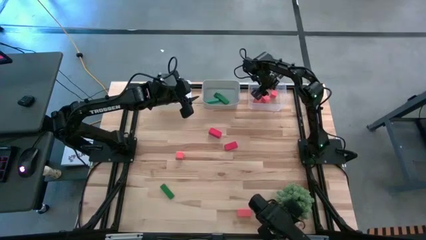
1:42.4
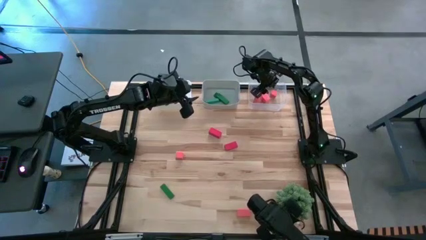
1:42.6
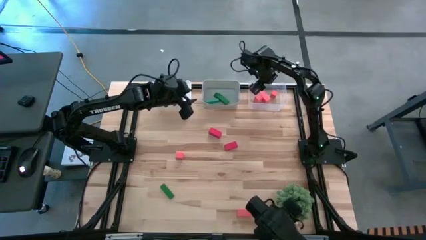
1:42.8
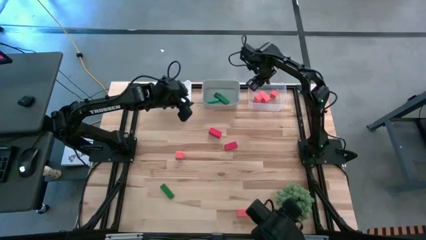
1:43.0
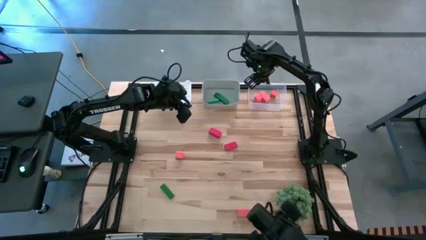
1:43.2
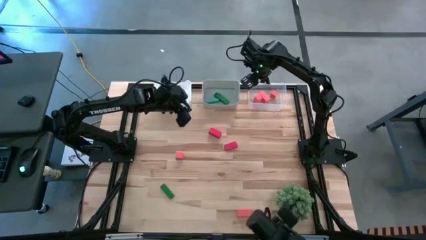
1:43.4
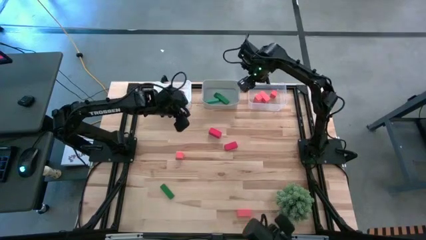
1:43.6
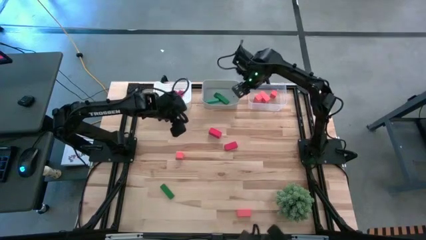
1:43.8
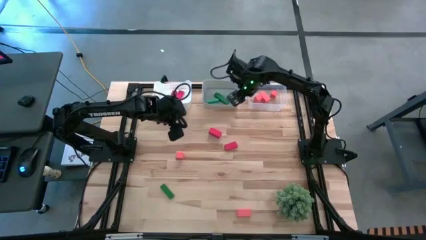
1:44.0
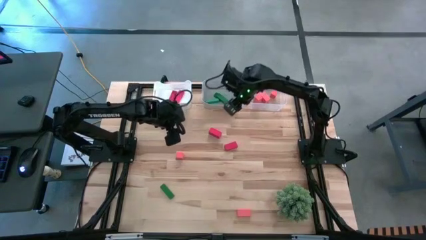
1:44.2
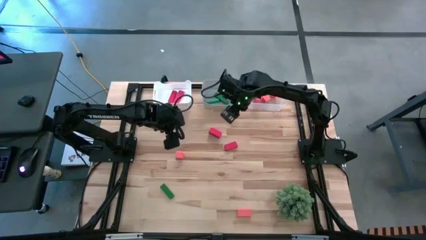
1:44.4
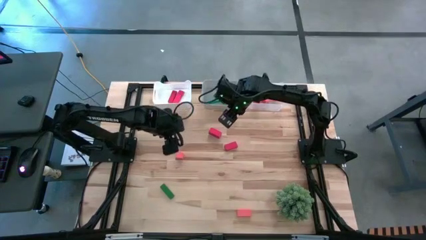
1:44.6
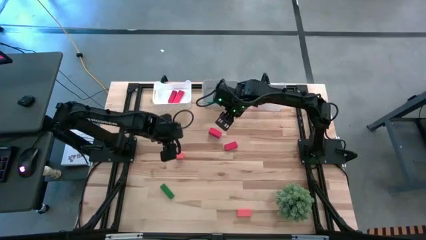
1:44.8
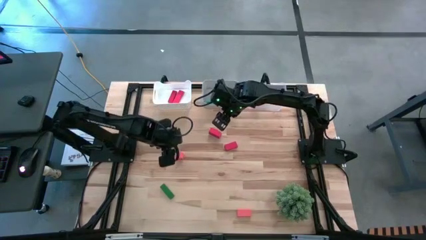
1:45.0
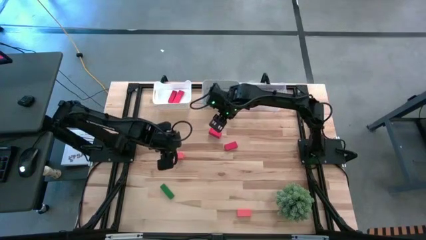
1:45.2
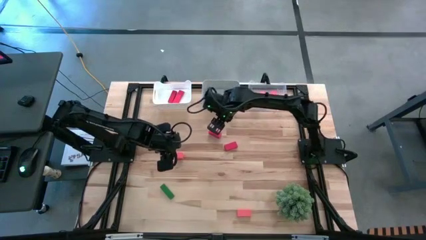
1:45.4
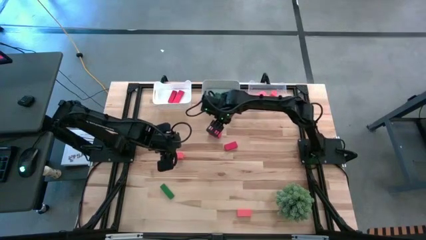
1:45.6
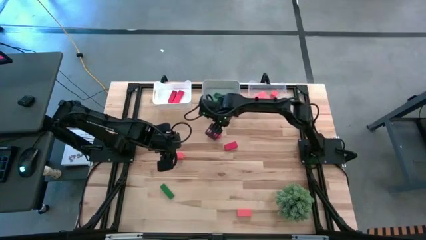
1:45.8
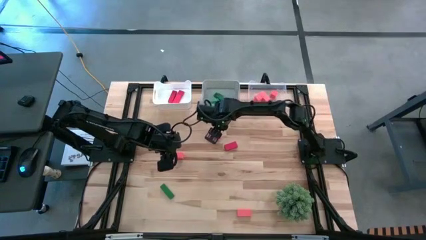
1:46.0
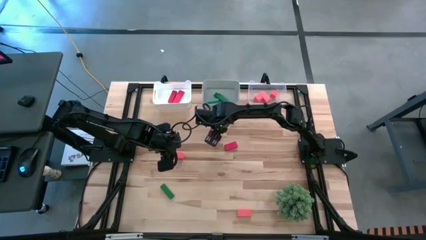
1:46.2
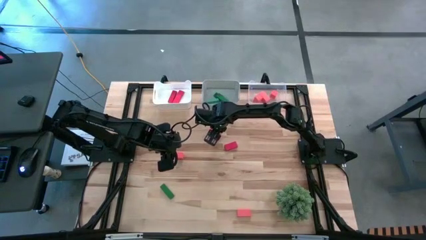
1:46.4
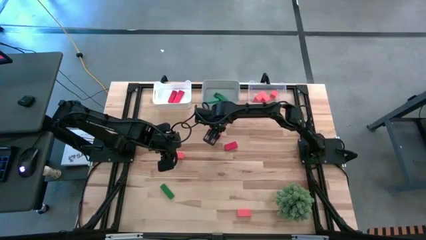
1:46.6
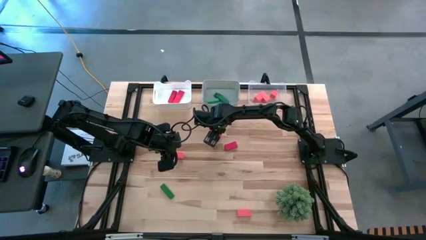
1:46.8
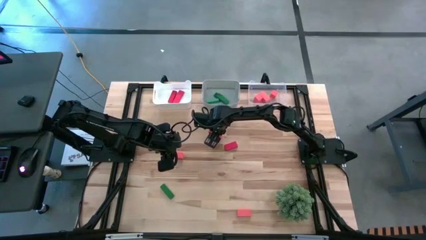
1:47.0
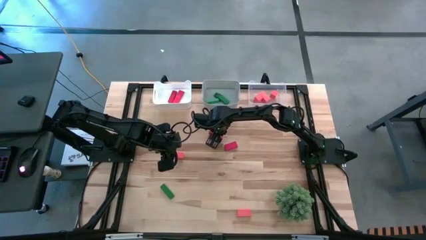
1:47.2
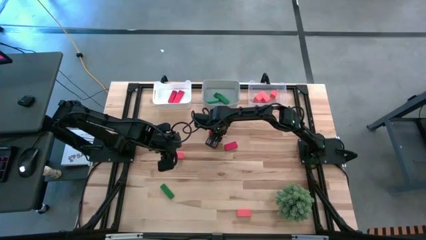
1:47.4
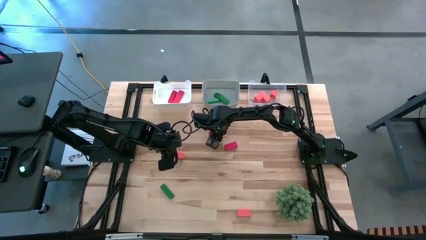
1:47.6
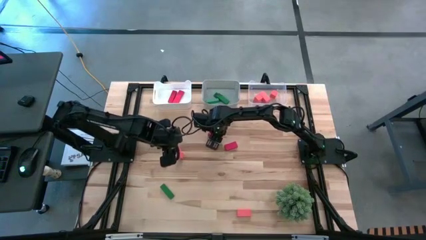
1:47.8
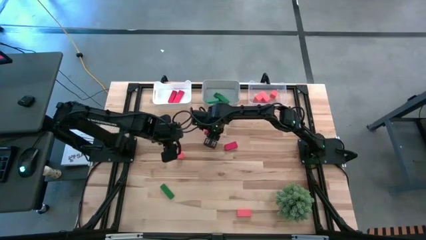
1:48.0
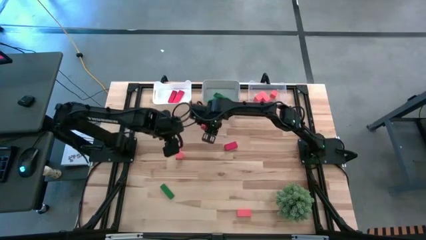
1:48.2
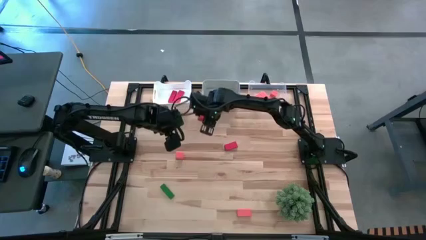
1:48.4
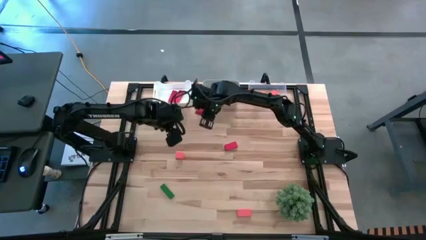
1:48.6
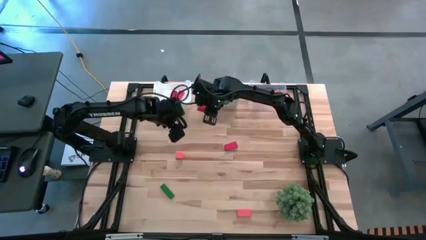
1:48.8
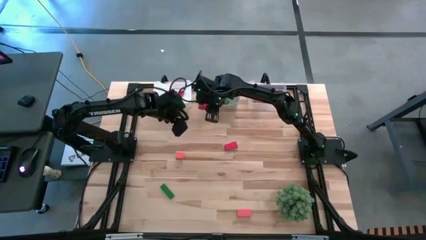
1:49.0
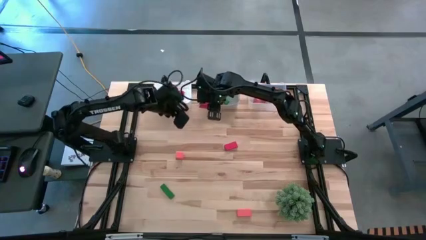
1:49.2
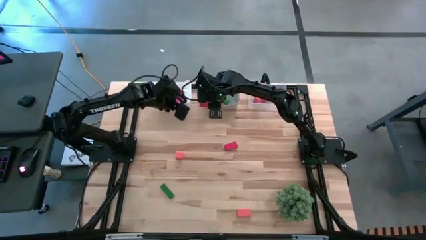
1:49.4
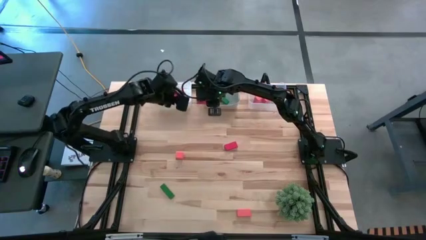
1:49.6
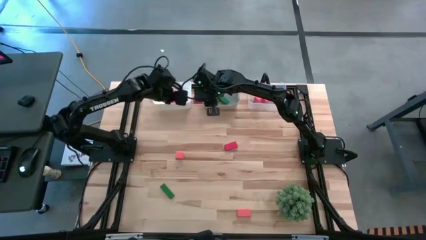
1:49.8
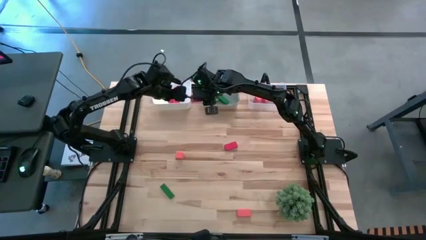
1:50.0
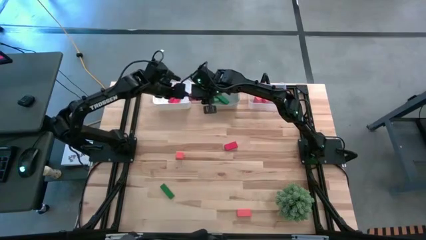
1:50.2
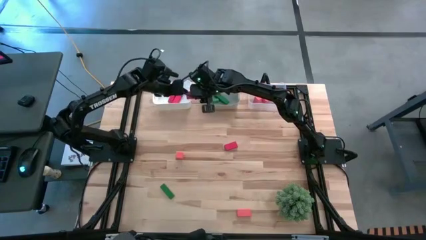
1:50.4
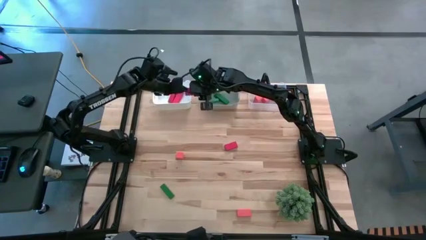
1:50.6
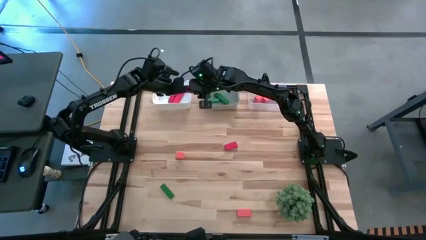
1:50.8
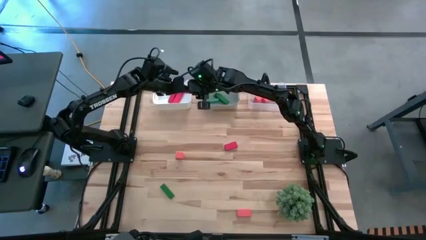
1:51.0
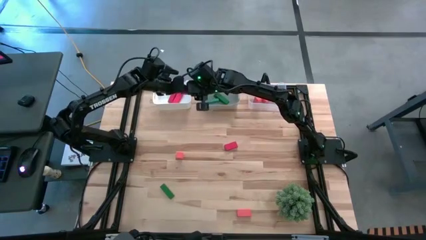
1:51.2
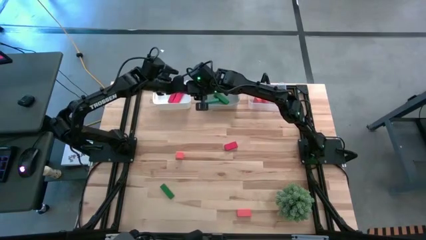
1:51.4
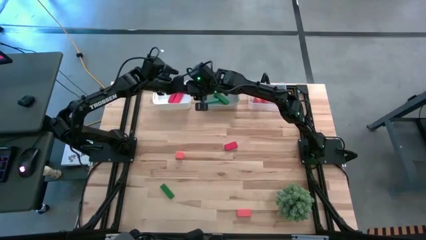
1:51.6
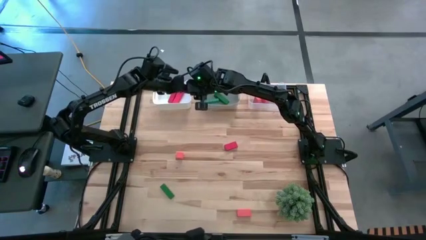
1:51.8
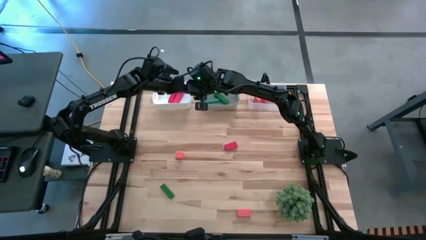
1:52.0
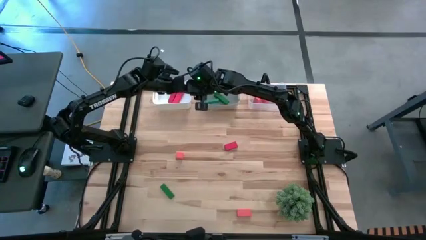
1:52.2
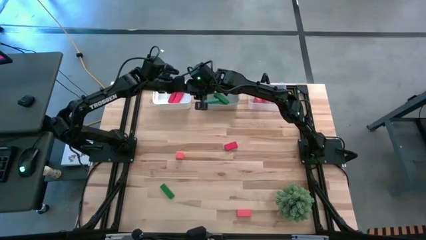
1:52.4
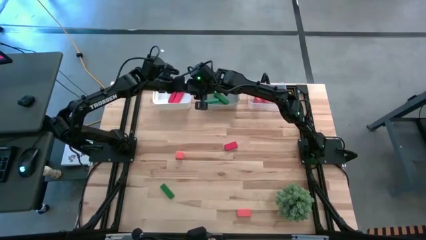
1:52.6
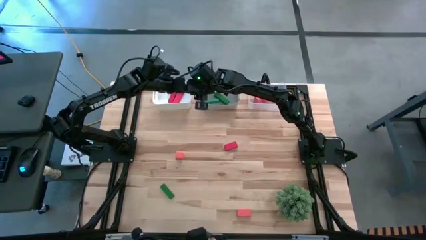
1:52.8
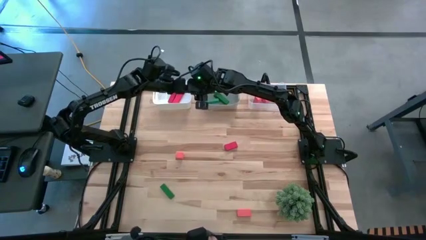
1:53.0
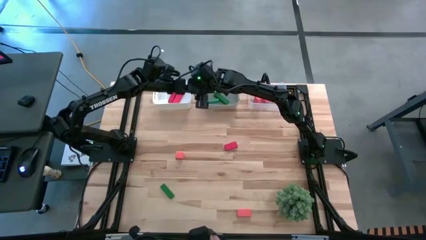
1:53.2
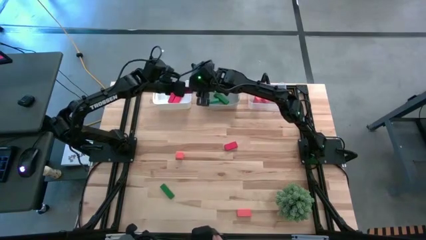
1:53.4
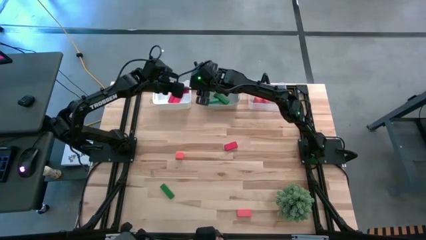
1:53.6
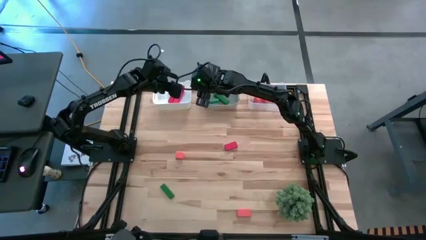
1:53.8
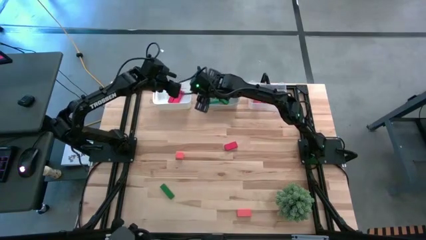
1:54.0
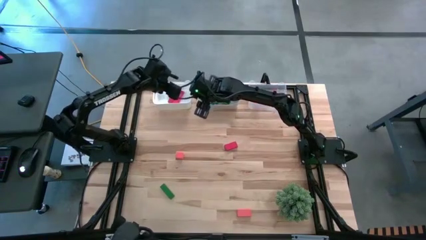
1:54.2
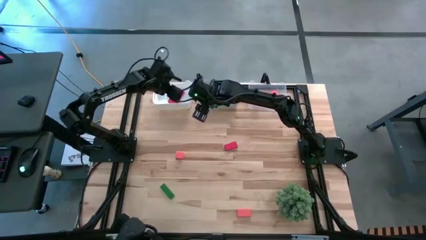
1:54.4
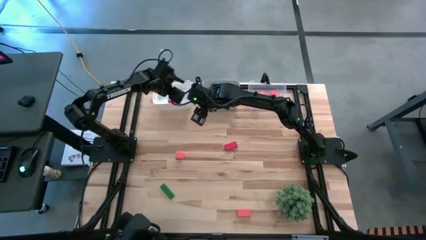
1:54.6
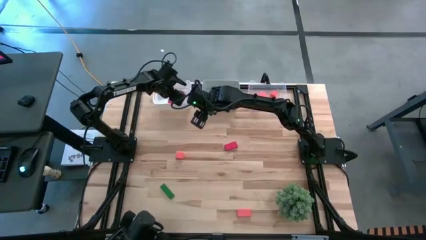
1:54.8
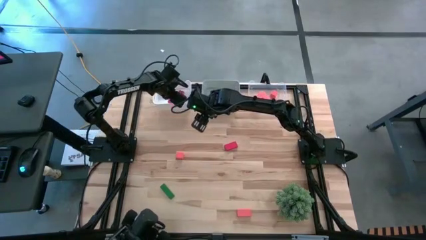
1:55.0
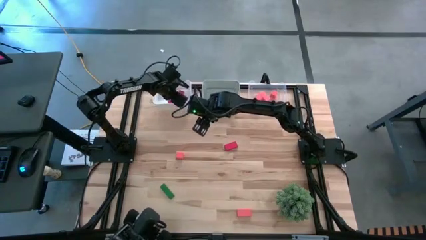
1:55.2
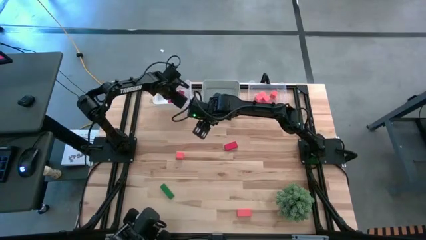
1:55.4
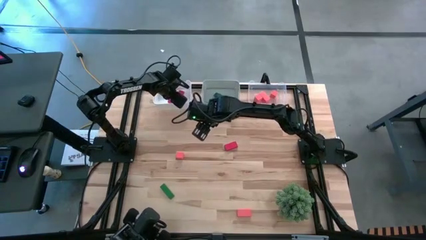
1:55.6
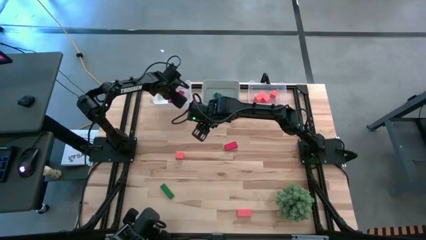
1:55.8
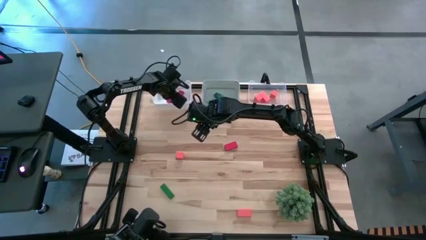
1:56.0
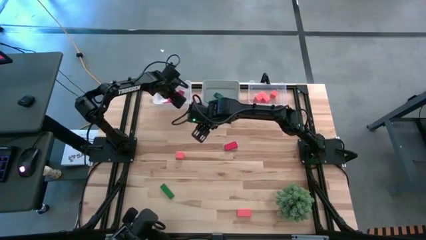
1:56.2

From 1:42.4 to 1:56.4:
Task: Sort & place blocks by color
Put the top red block into the white bin
